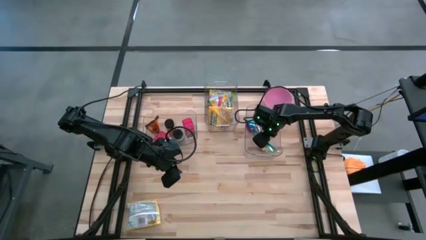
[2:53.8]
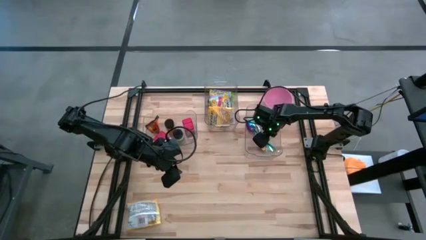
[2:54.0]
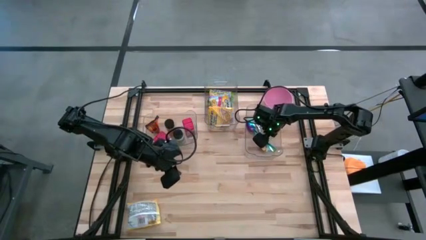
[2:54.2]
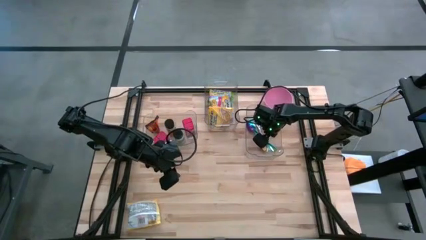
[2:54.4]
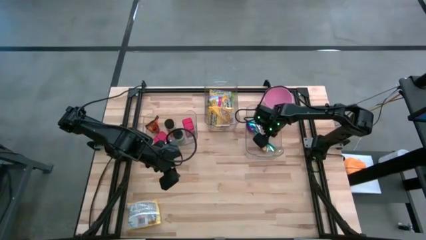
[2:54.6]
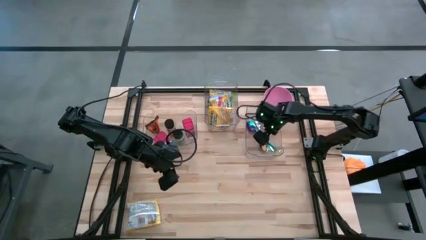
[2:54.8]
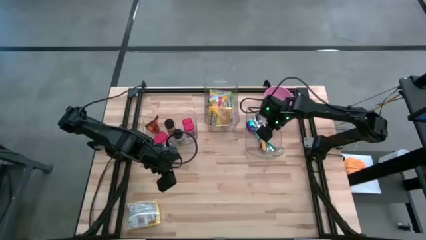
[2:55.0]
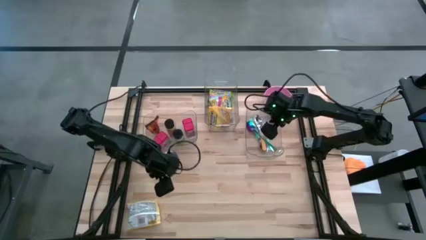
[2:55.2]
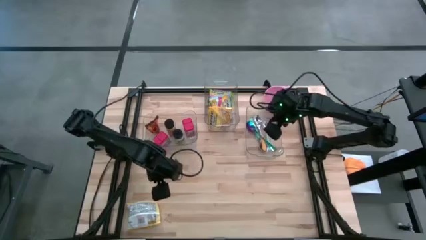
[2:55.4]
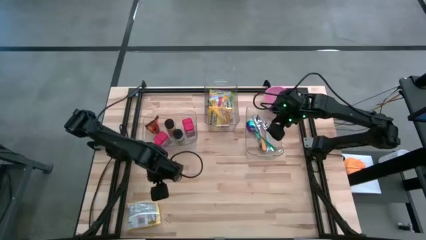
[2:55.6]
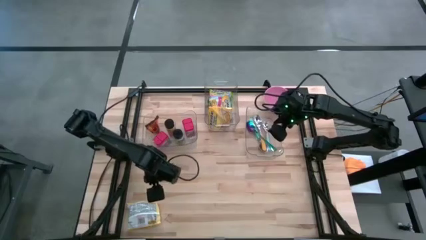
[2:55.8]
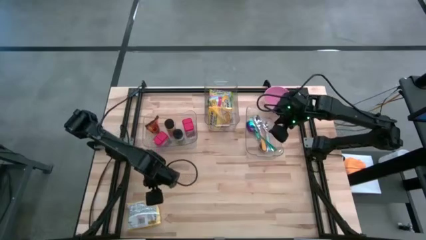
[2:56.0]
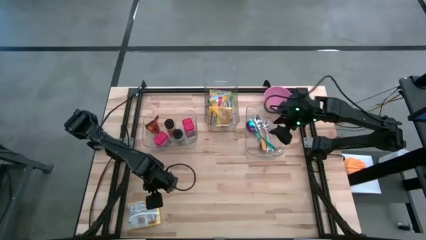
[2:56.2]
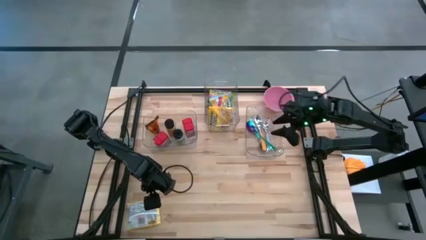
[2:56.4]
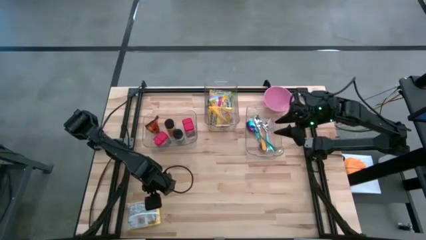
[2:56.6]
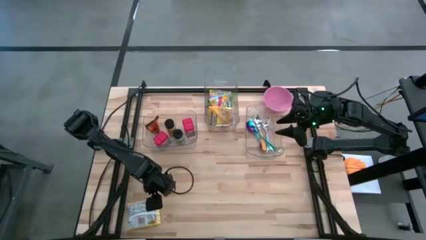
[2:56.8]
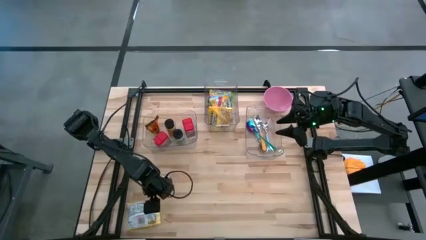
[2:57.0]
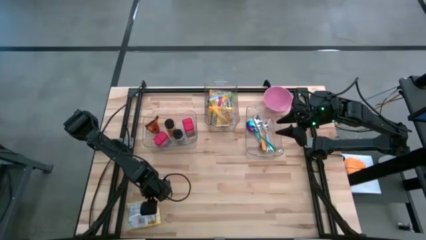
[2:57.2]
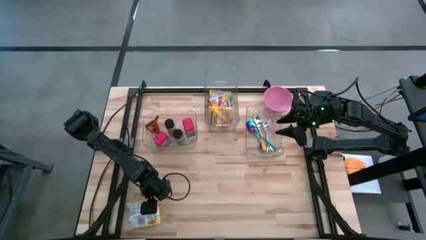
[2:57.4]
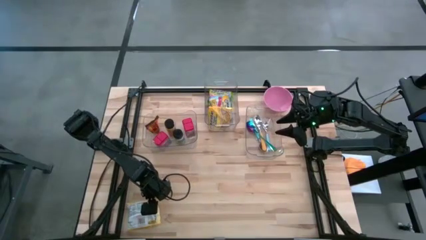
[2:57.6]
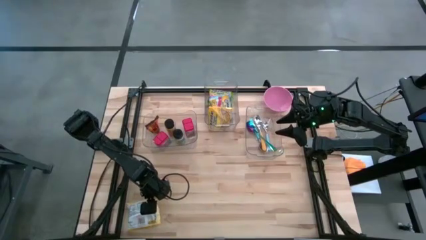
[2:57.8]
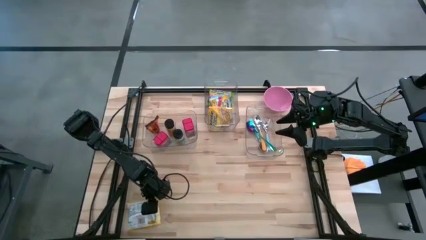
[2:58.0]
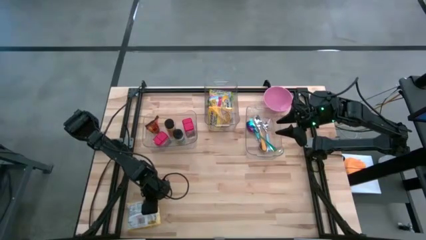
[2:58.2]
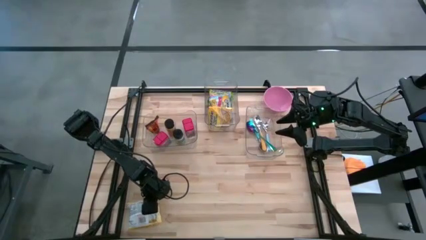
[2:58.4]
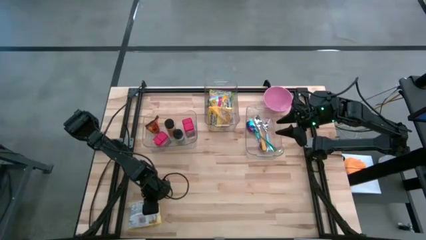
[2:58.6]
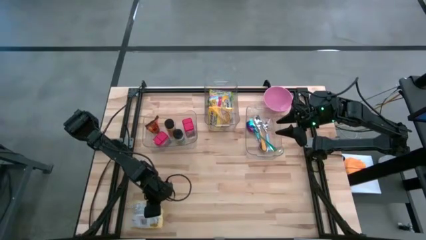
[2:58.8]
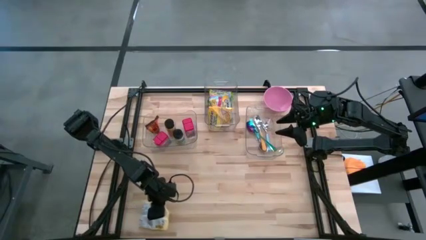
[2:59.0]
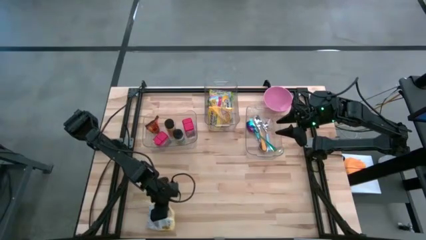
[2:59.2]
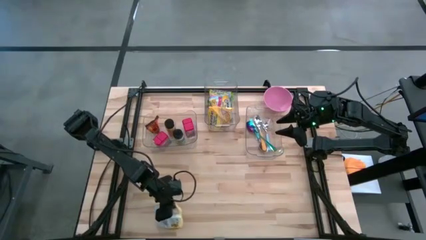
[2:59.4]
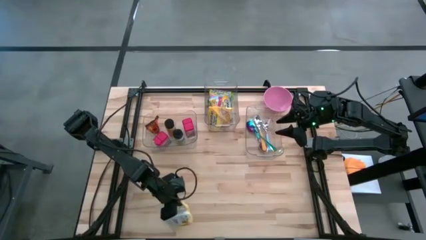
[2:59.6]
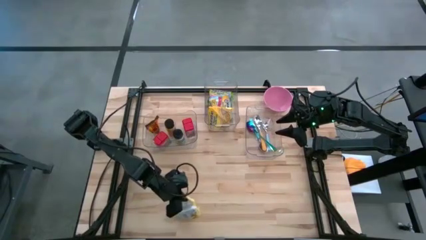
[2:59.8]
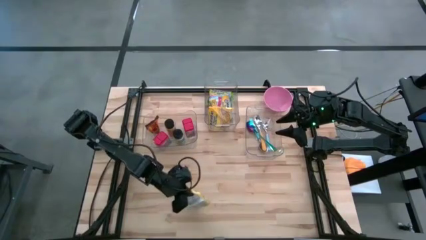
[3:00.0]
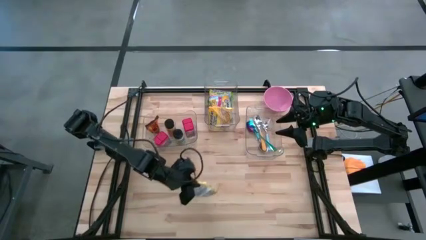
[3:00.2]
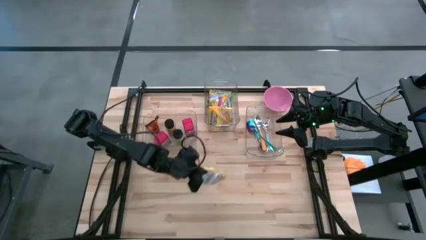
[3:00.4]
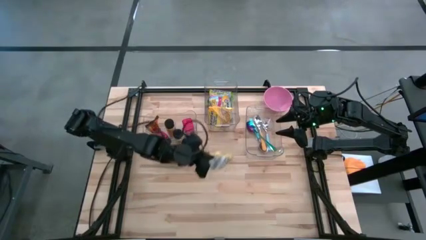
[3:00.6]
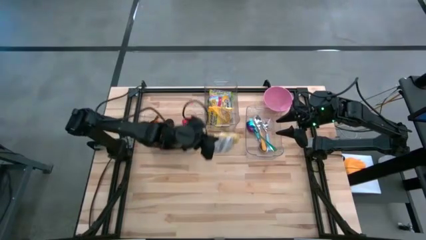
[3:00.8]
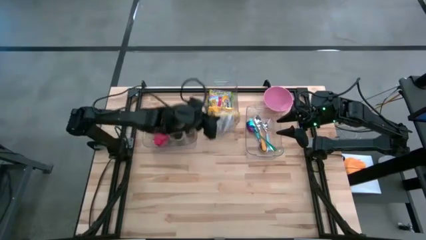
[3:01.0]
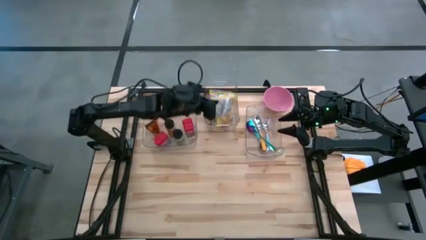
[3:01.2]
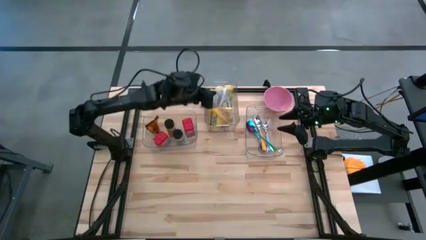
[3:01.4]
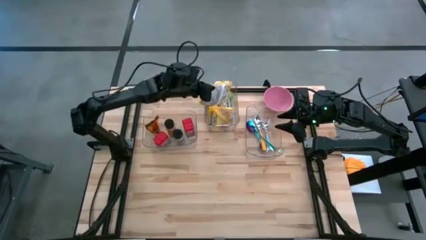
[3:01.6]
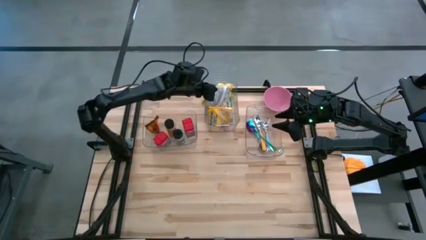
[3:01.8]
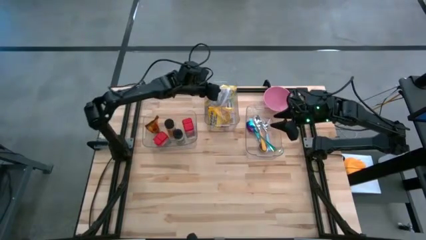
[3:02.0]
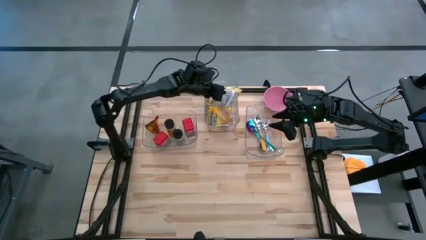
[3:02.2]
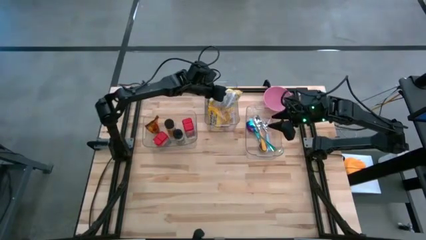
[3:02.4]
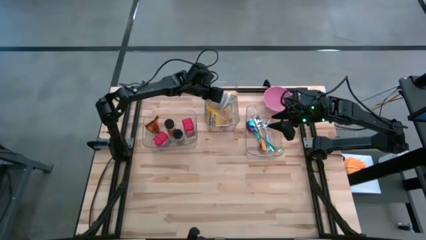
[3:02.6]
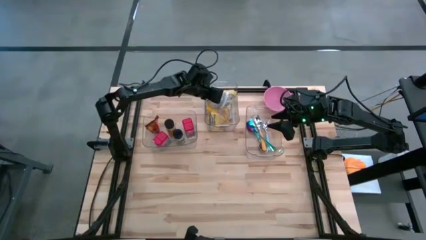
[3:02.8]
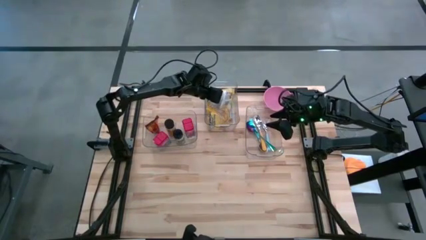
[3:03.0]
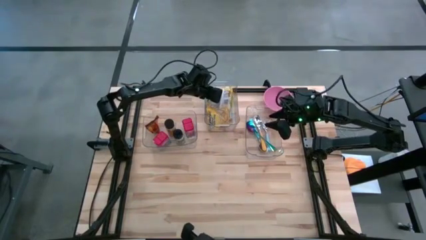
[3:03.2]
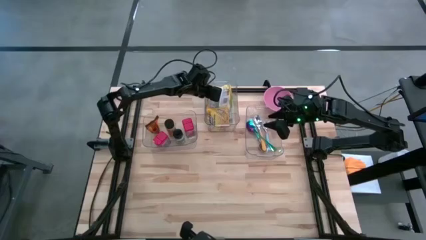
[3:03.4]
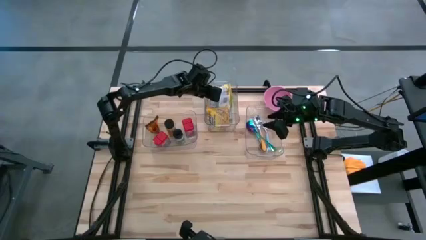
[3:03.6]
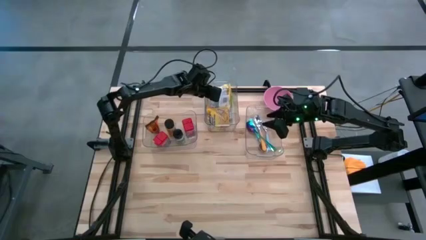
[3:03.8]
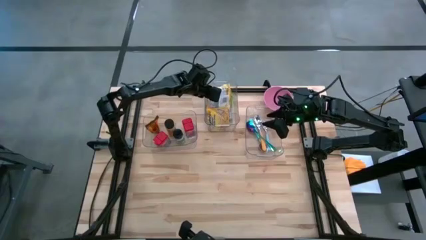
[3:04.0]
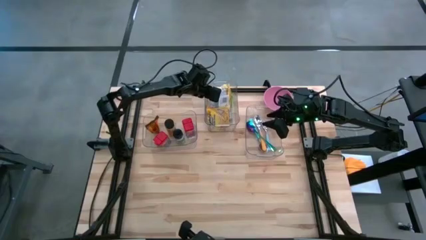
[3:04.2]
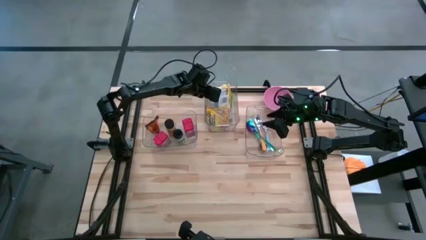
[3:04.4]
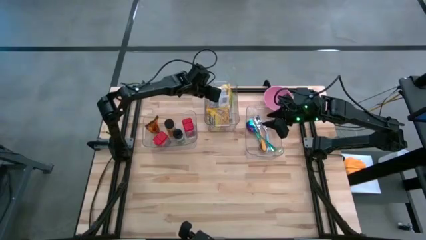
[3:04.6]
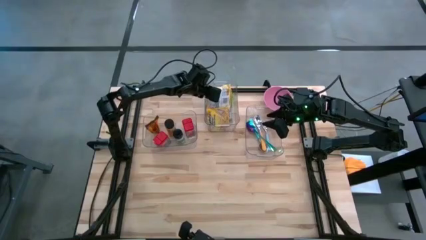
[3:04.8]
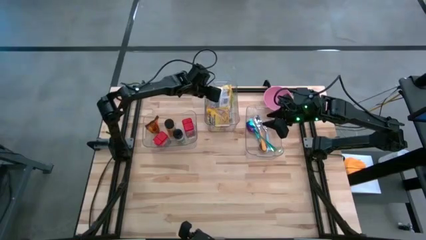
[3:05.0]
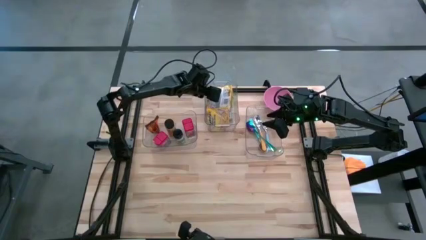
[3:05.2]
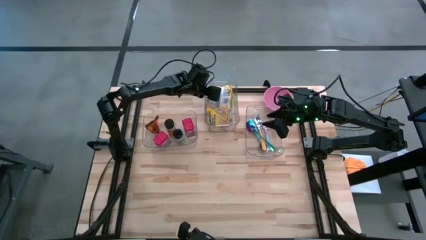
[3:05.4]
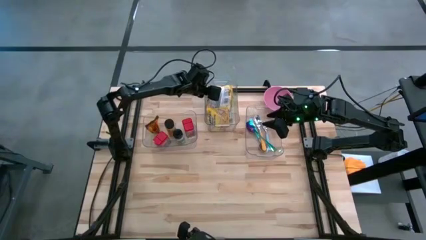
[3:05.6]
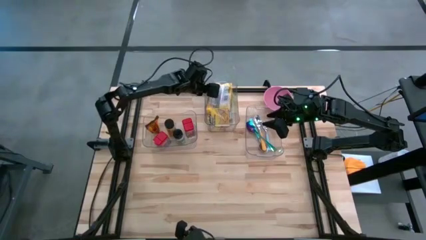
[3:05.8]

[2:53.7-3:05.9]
Put the yellow noodle pack into the middle transparent bin
